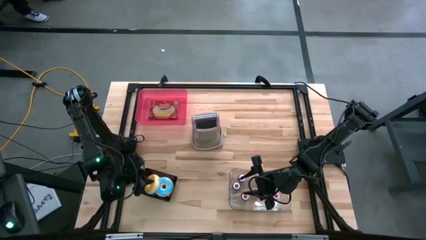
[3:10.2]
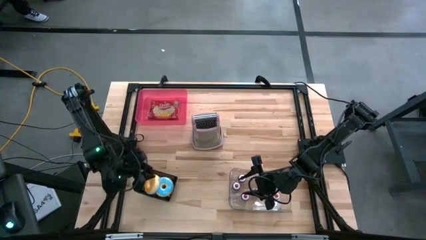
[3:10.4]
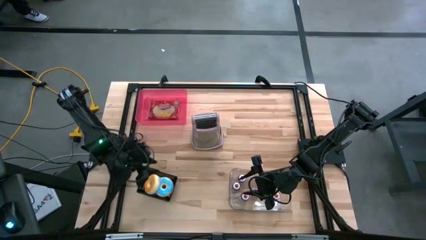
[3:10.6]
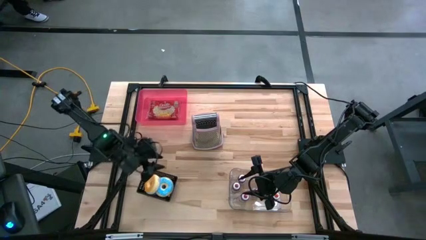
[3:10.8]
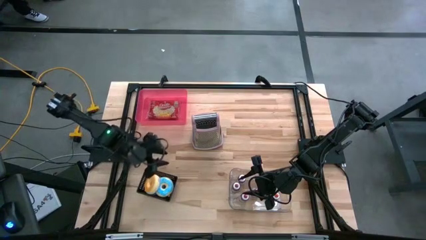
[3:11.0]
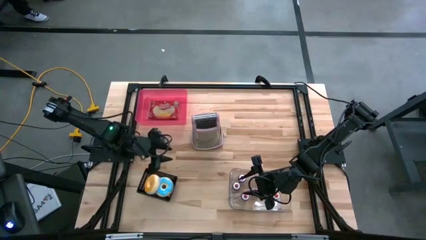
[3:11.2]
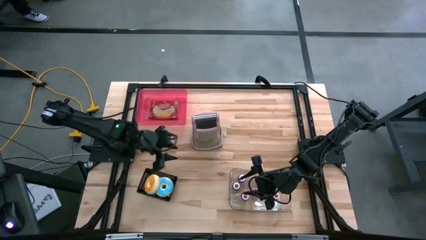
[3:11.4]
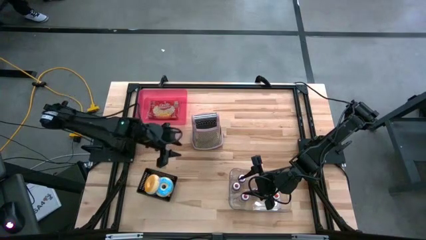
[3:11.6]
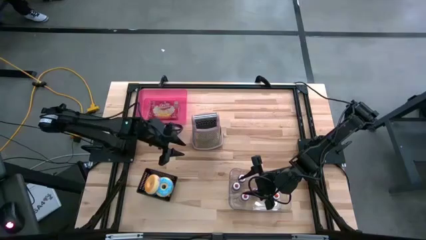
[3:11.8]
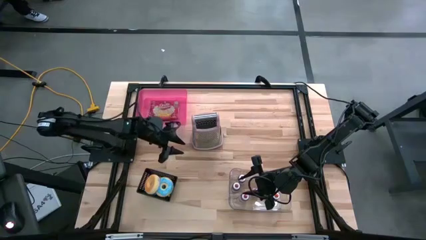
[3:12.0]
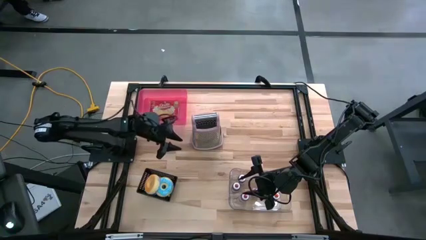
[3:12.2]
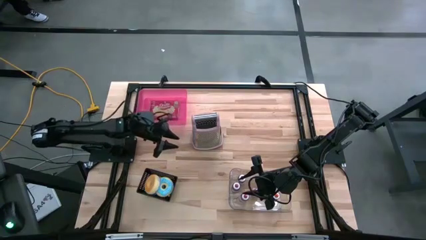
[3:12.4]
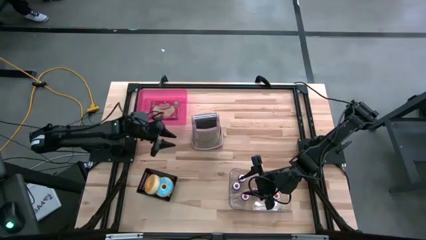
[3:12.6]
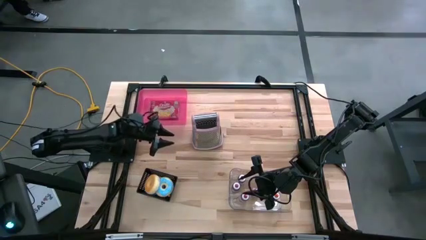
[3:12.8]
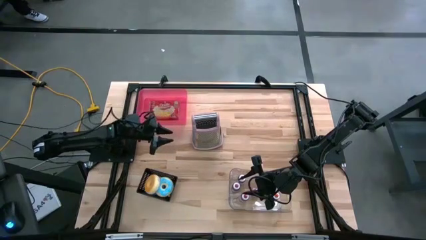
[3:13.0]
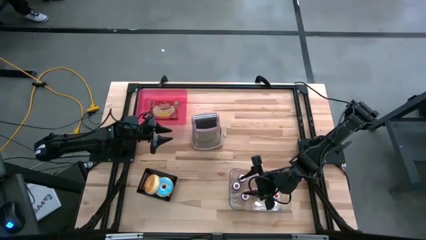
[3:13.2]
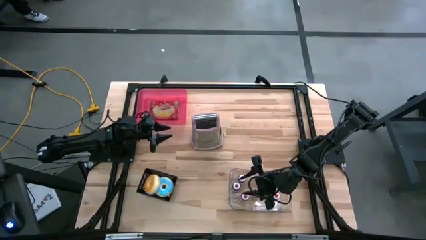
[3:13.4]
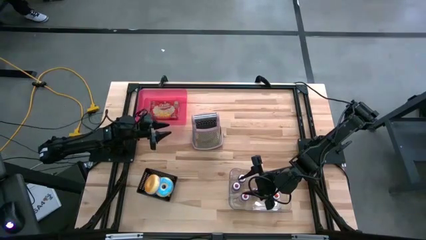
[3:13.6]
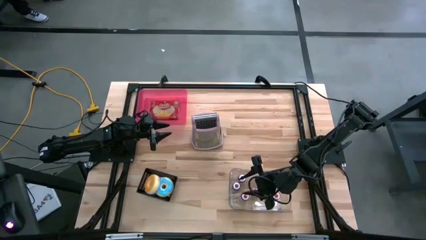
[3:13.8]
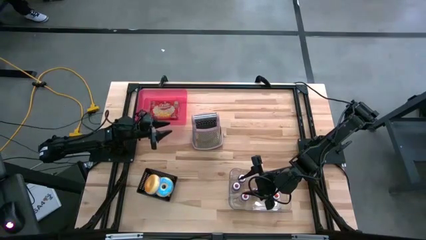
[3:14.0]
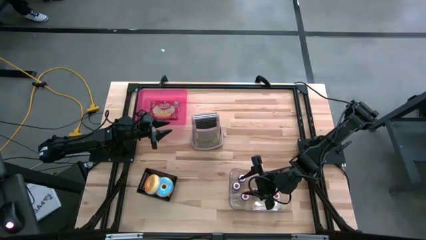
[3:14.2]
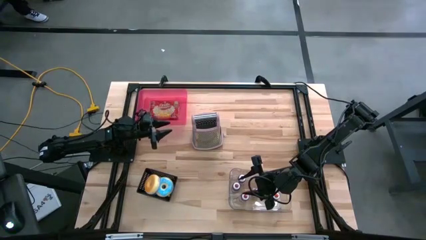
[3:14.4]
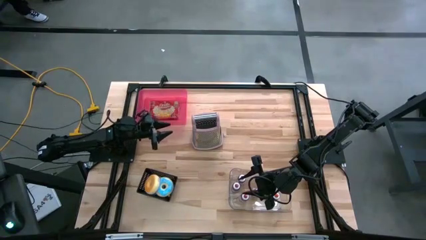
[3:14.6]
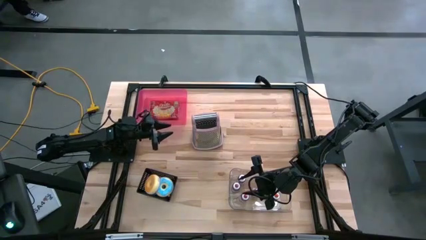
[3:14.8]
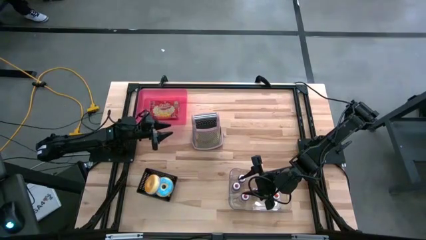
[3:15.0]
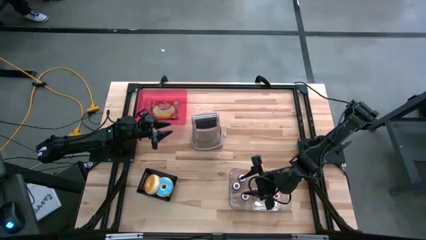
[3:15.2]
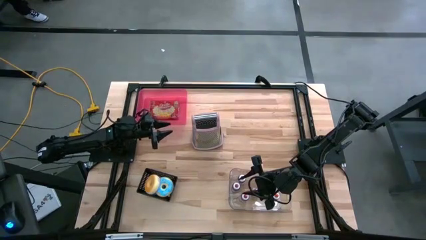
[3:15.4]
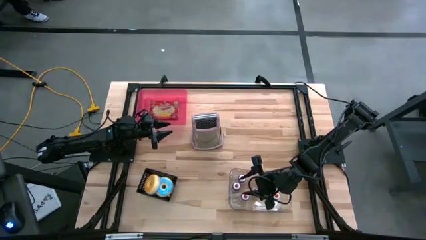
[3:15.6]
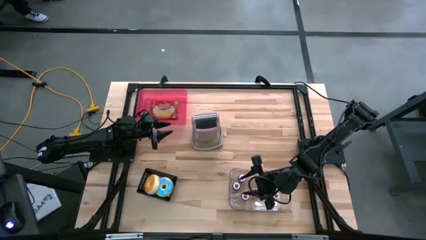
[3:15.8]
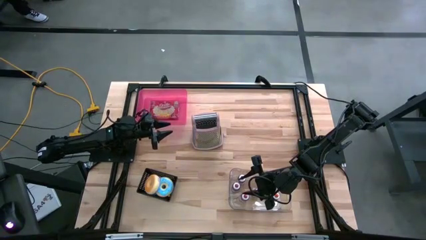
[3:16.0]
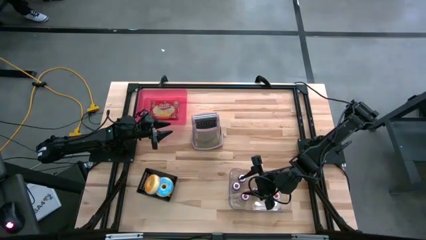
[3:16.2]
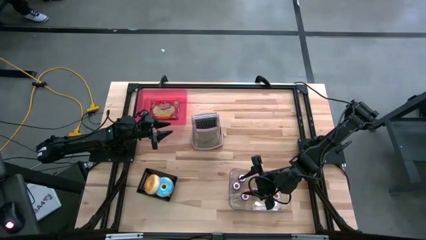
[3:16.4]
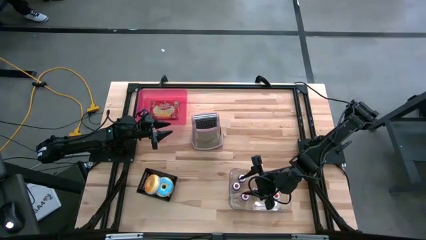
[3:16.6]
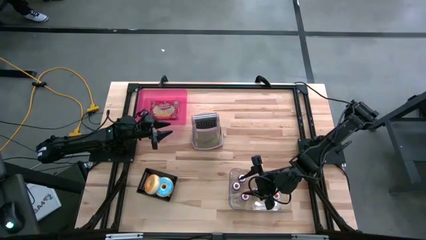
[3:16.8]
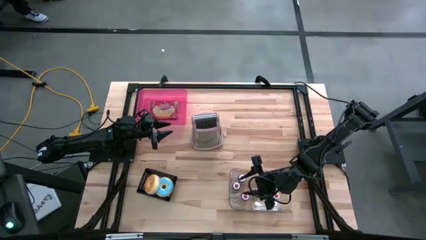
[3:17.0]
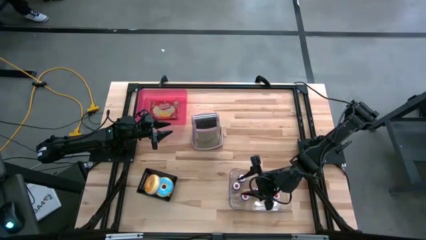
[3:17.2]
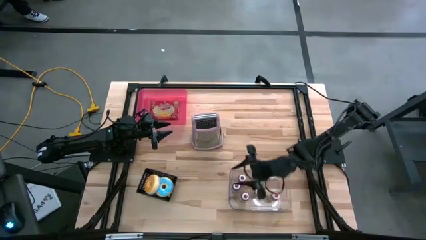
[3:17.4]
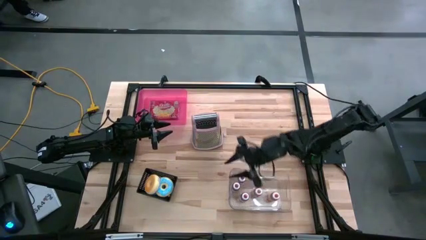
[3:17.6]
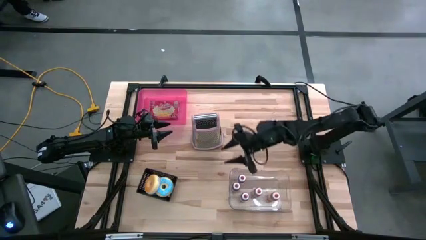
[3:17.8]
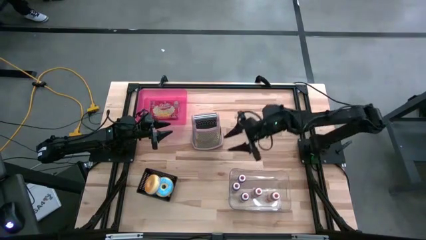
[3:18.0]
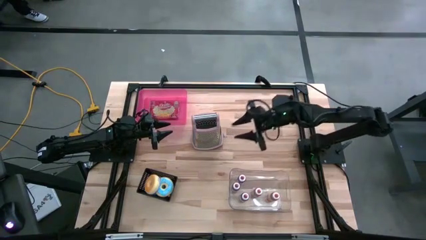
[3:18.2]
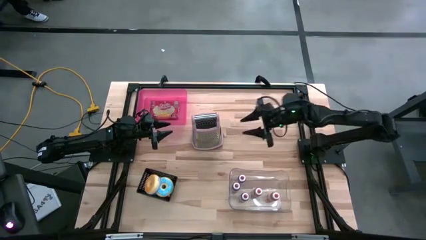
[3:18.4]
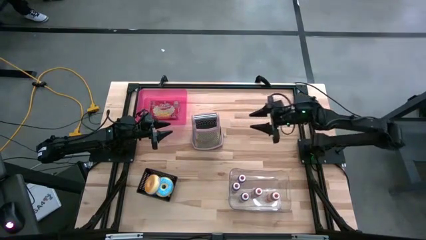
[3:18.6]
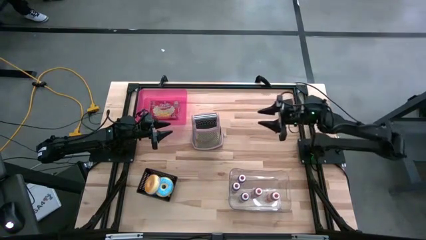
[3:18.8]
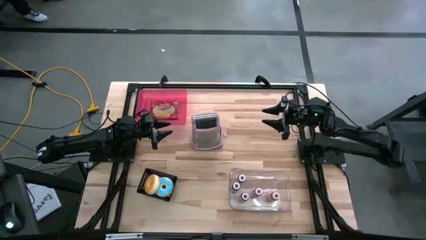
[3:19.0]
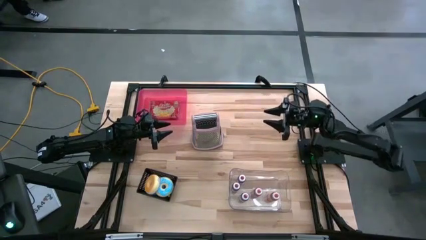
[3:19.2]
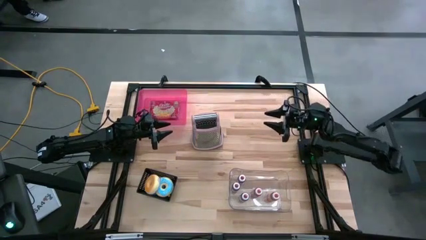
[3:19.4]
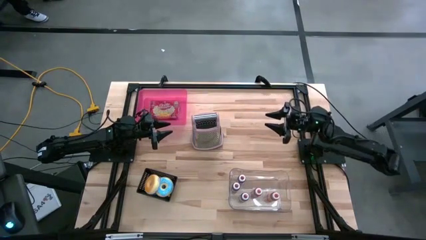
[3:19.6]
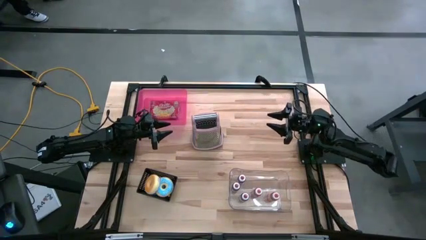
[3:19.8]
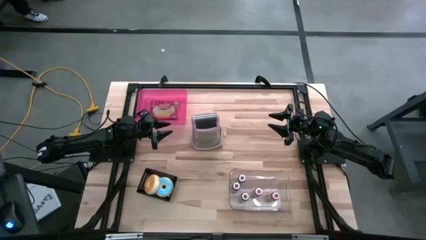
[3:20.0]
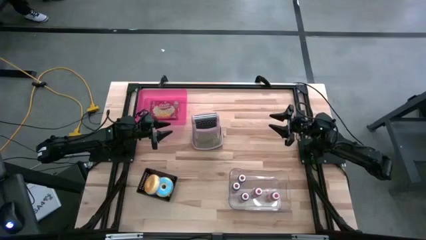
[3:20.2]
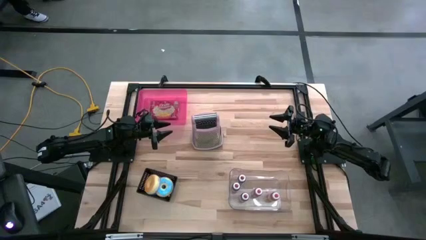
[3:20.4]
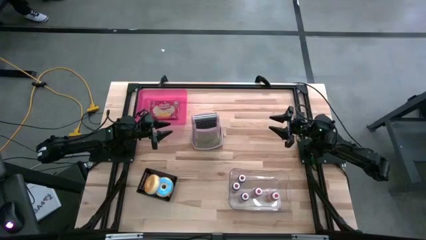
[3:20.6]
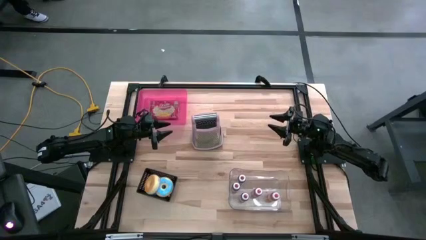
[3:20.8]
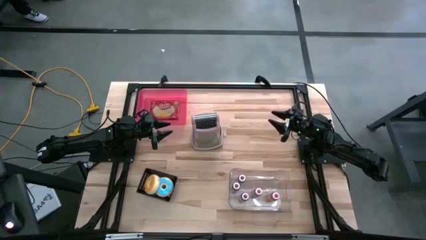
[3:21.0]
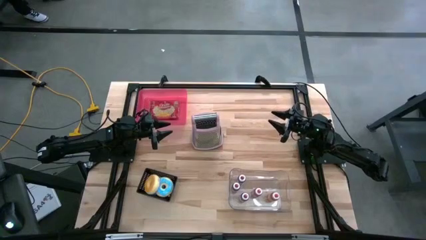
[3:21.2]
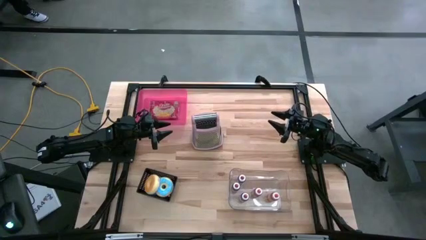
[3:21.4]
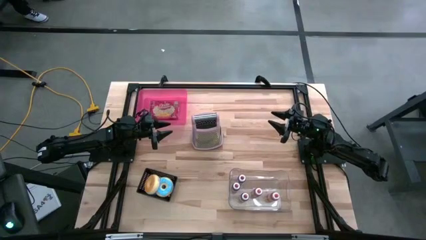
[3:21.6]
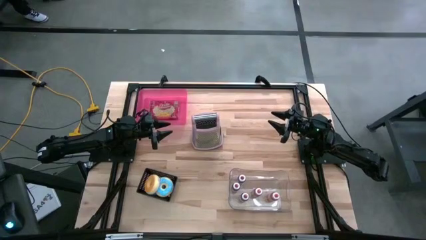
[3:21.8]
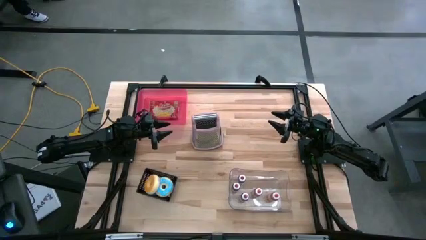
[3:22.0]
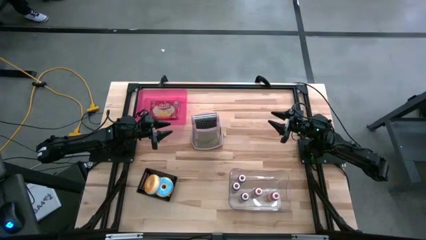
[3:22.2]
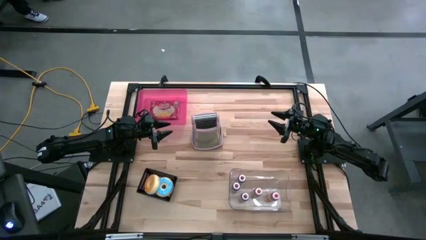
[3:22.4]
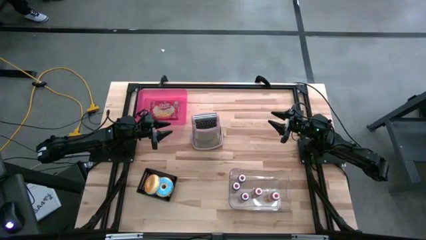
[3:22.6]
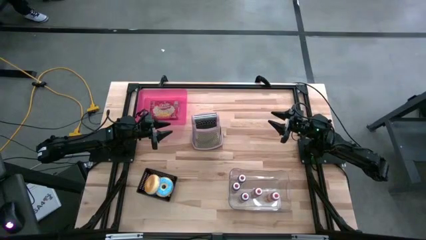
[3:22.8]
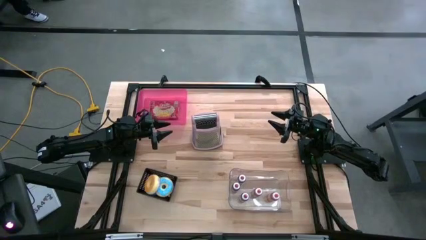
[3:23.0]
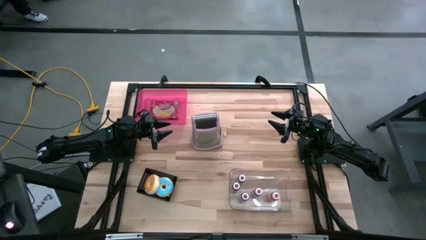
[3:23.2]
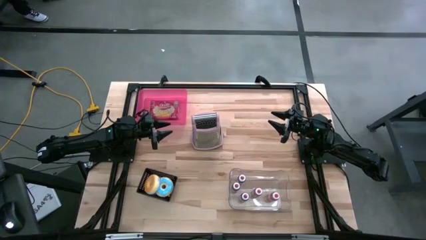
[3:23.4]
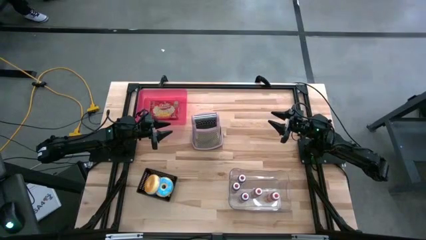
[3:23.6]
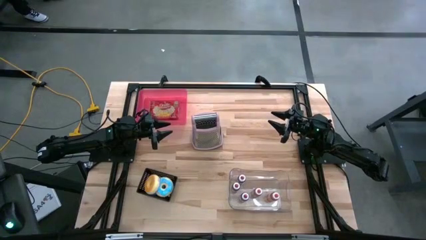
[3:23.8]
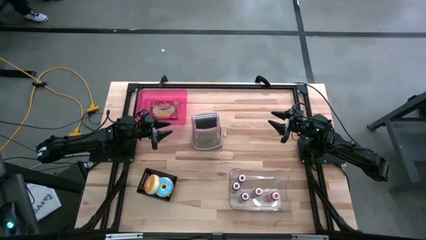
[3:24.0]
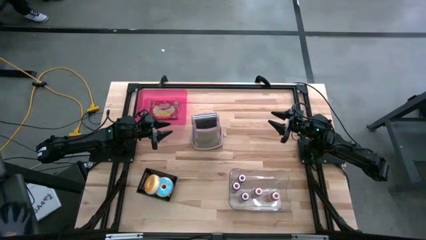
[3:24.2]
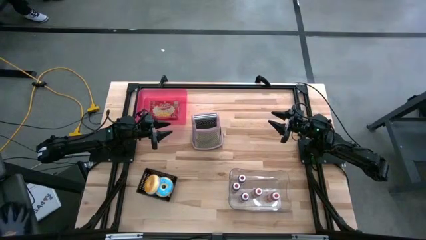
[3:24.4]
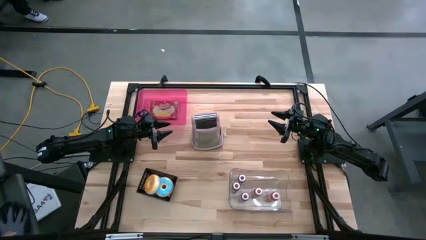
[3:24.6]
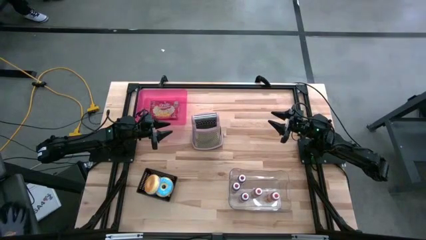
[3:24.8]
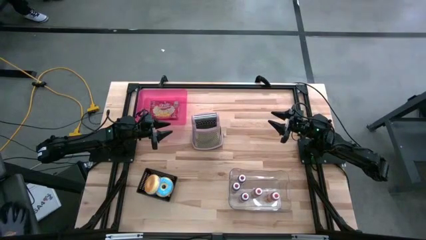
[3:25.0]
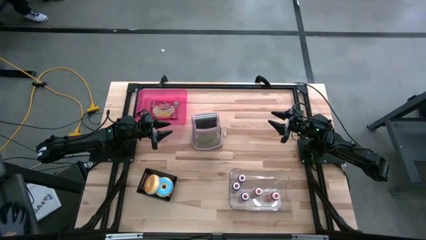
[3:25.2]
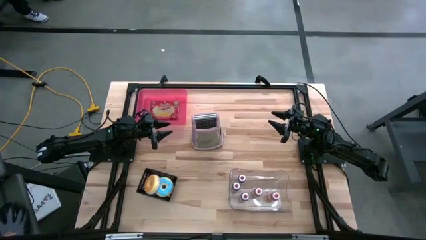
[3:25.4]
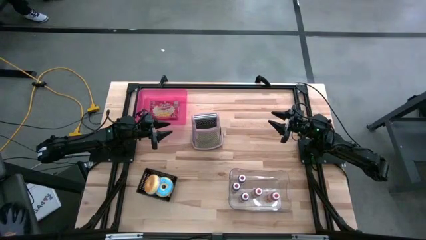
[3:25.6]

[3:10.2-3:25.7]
Task: Pick & Place Food Item
Return to Home Position

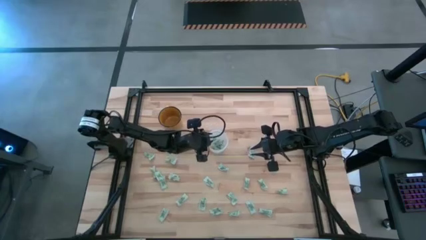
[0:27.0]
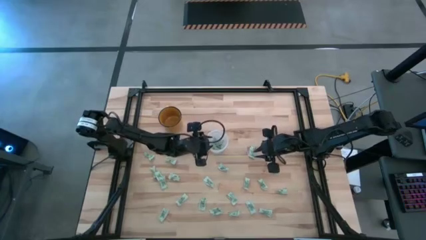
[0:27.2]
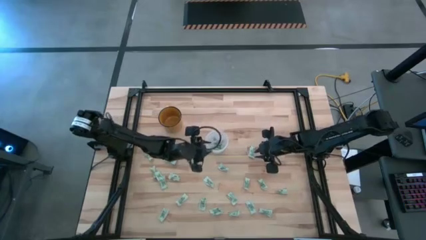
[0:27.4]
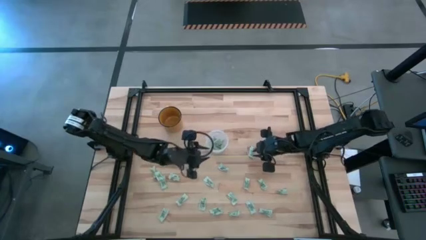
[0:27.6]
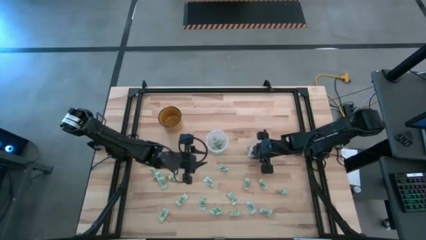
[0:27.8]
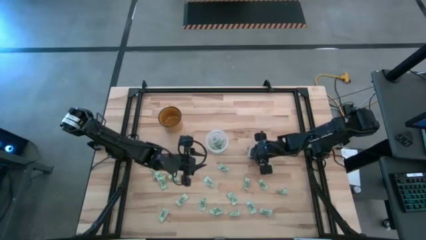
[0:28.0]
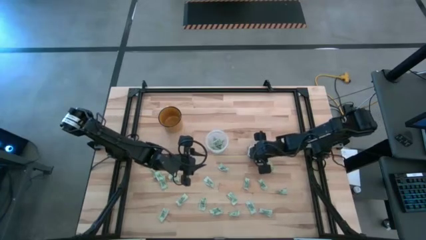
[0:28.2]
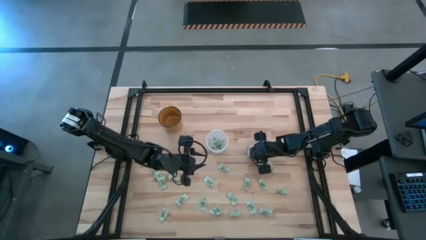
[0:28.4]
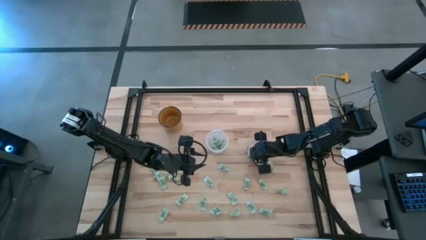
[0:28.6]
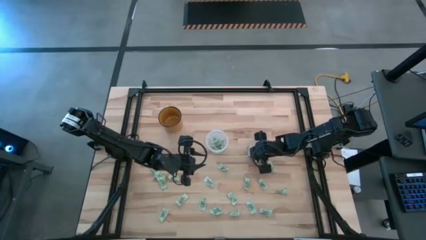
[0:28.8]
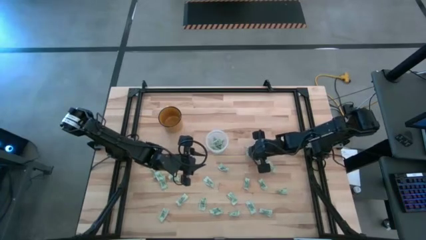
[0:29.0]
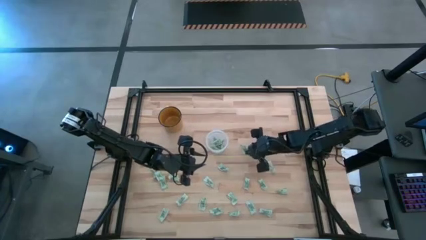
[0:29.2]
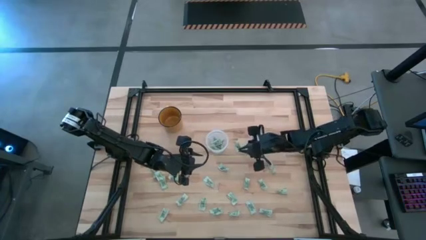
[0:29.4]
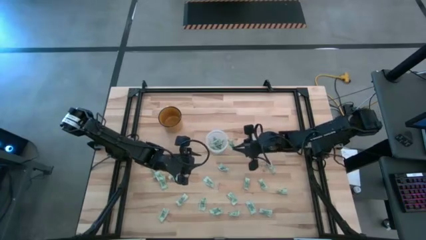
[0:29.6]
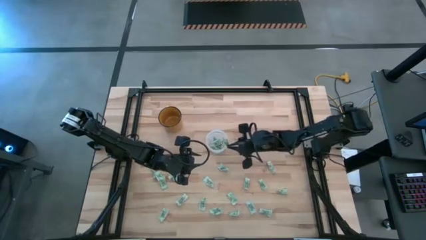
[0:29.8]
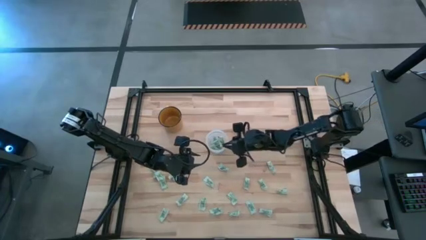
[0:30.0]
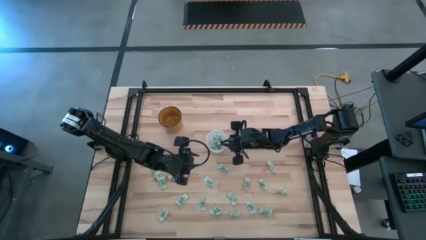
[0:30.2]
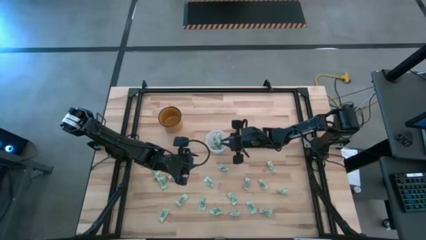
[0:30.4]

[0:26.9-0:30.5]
Task: Pick and place Stevia / Truvia into bins
Put the stevia packet into the transparent container
